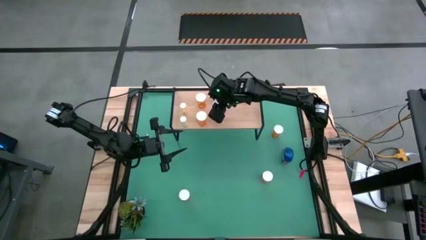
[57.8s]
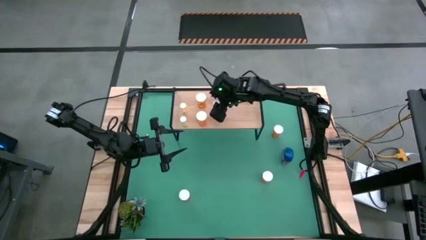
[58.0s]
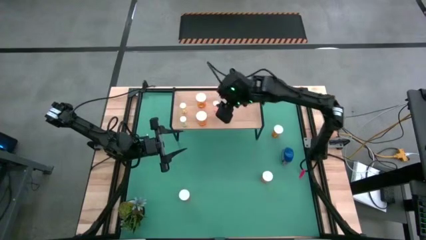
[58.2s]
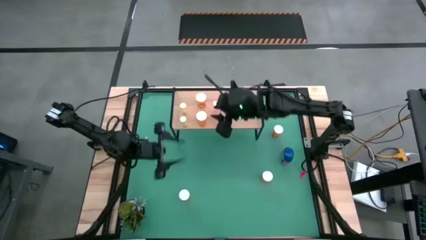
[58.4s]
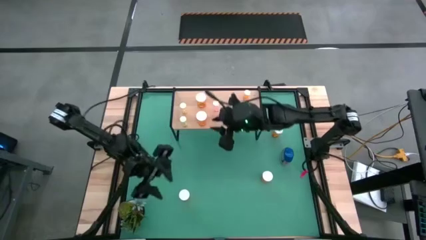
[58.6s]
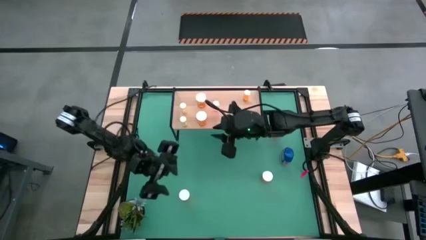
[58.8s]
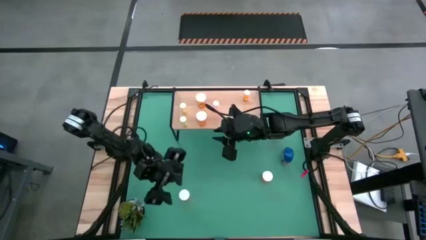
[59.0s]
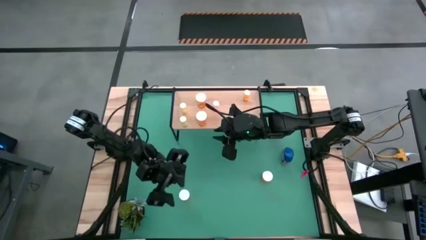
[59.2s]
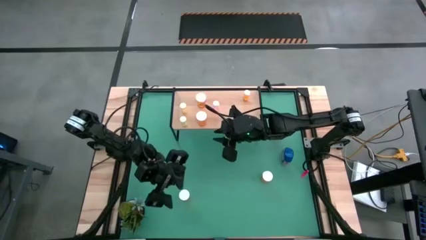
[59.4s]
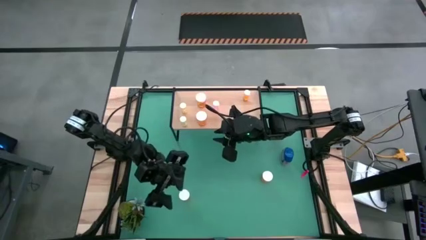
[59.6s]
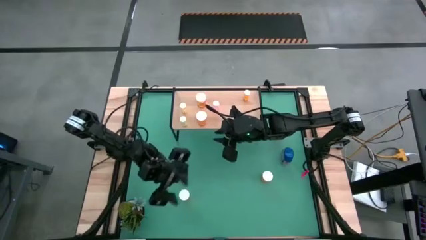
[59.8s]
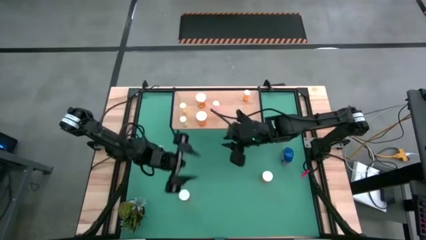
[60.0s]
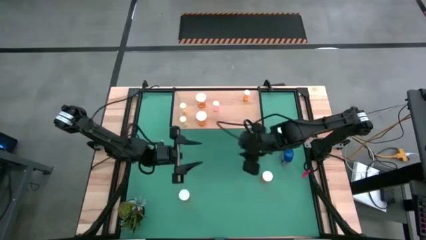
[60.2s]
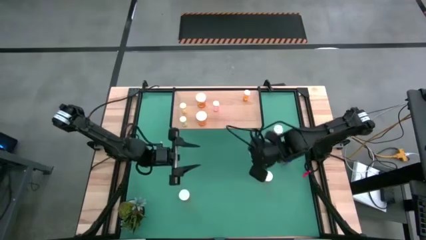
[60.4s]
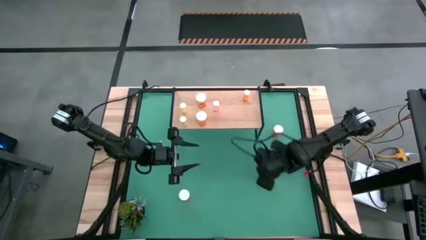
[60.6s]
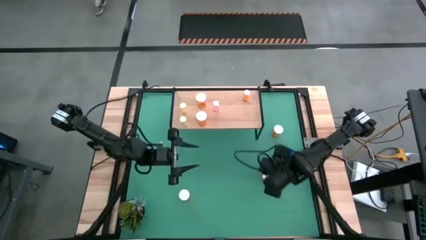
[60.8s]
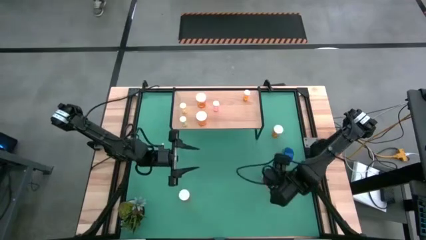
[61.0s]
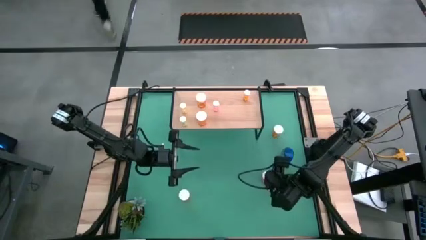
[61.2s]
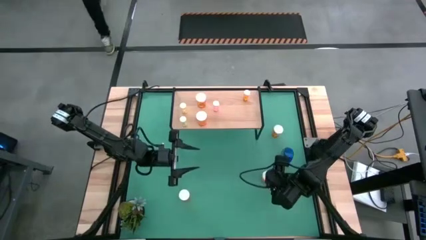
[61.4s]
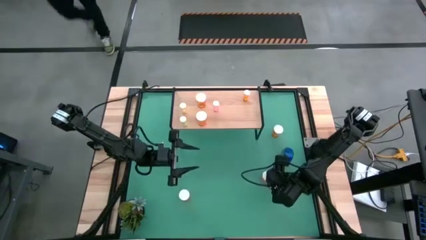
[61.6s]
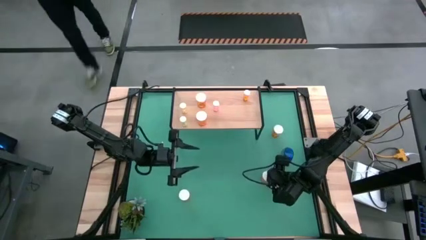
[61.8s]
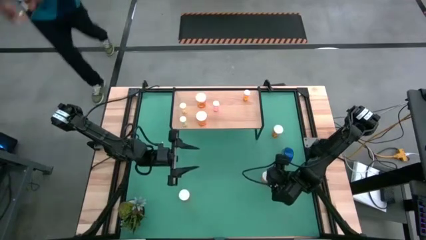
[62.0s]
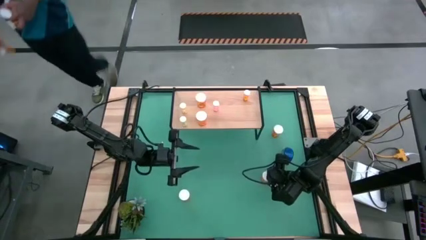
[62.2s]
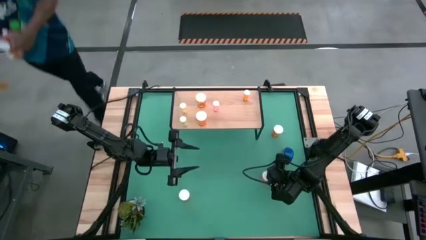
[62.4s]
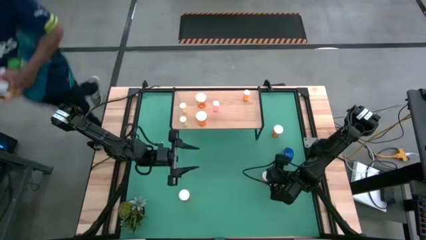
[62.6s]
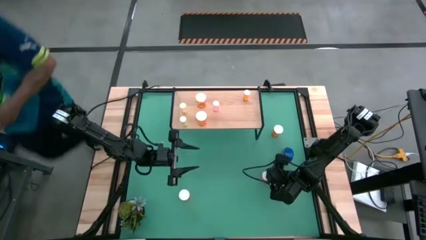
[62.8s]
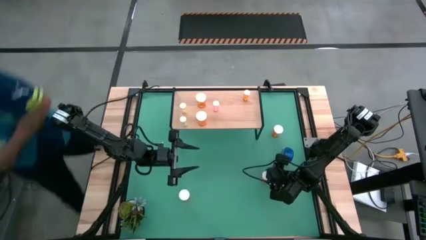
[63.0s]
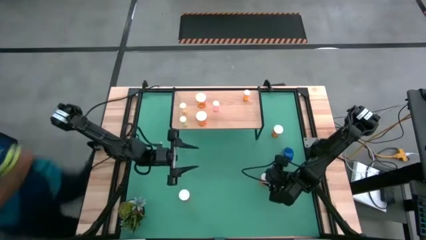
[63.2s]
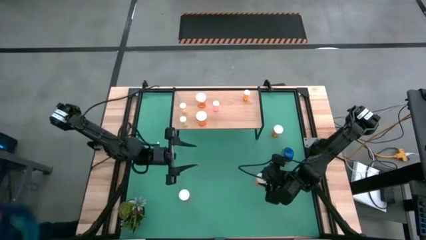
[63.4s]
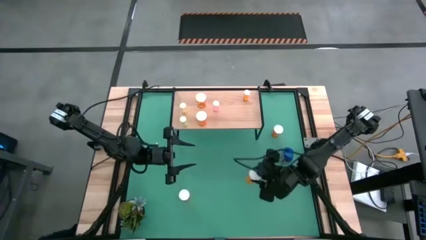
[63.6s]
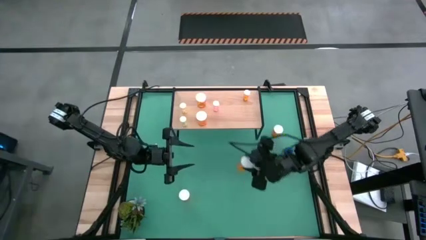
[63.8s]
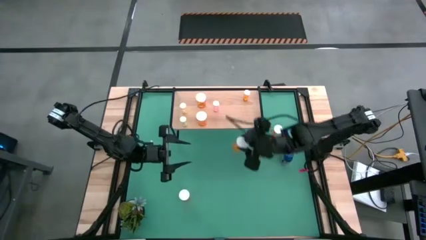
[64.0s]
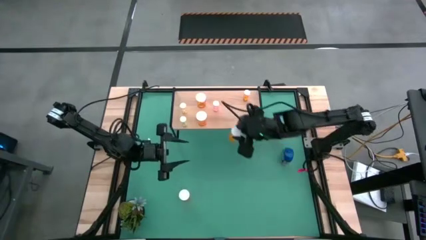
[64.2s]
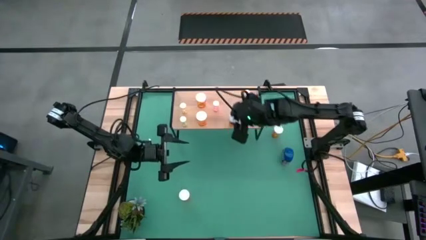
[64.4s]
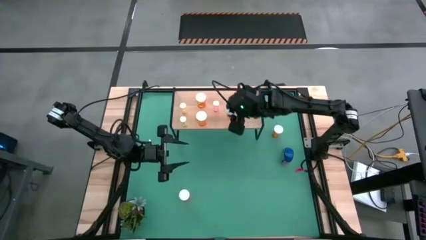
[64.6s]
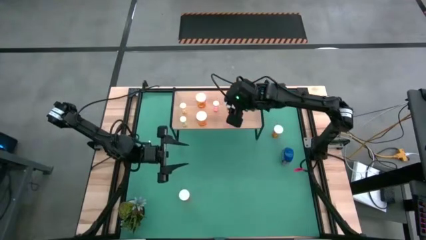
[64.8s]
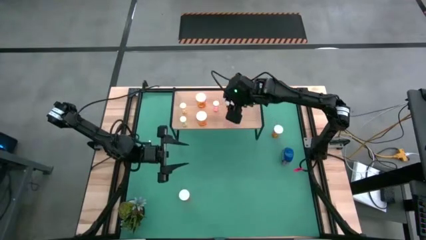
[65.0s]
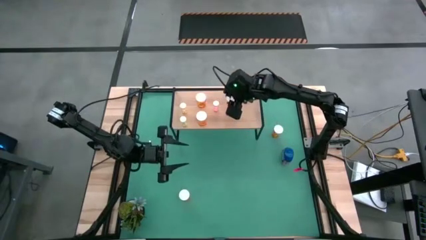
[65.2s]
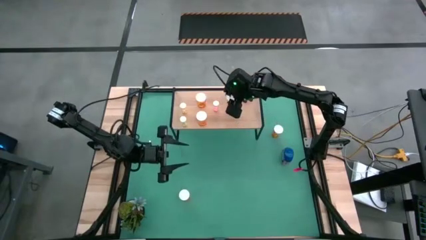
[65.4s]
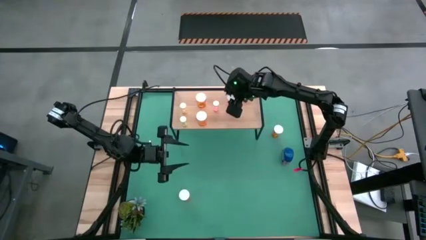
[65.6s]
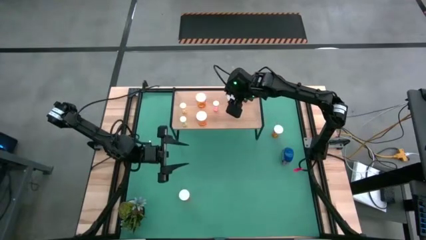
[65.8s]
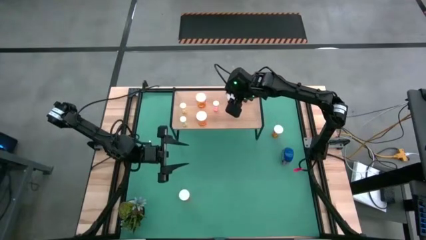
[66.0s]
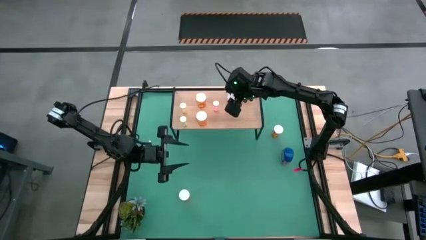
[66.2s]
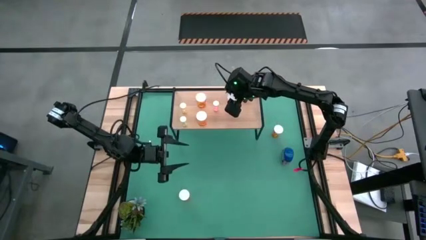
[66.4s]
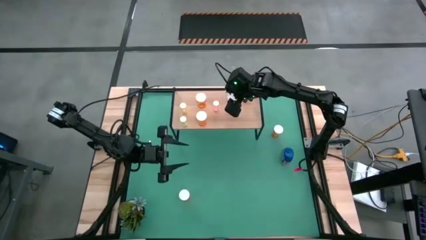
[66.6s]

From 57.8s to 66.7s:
Task: Pick and place medicine bottles onto shelf by color
Put the big orange pill bottle on the shelf

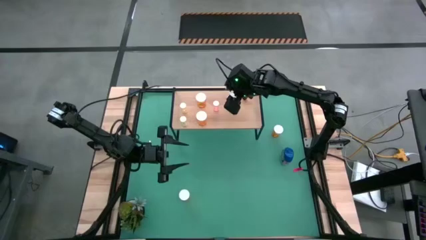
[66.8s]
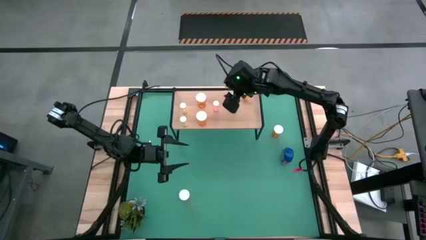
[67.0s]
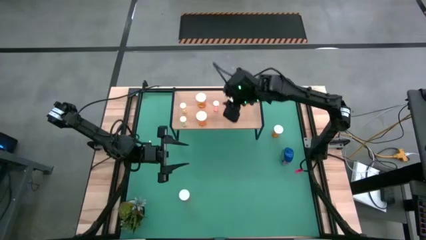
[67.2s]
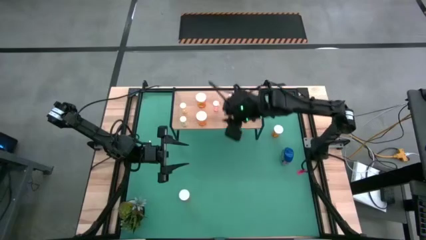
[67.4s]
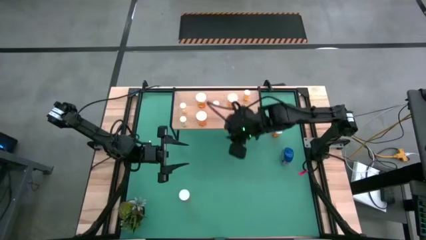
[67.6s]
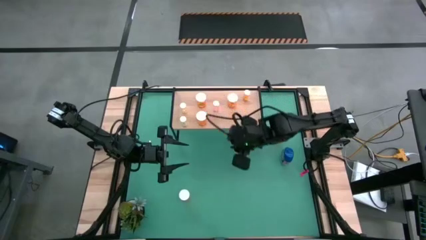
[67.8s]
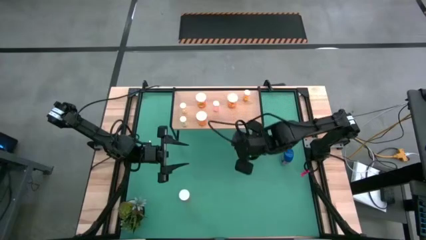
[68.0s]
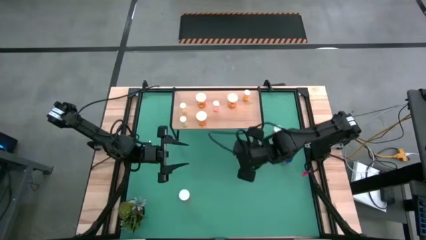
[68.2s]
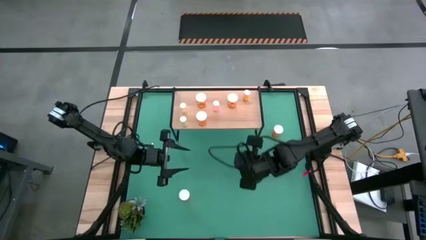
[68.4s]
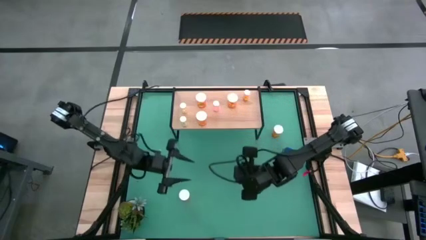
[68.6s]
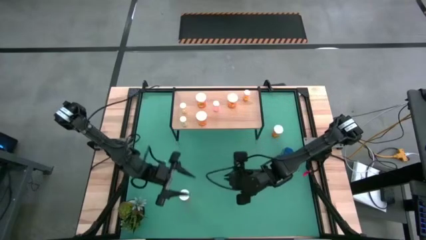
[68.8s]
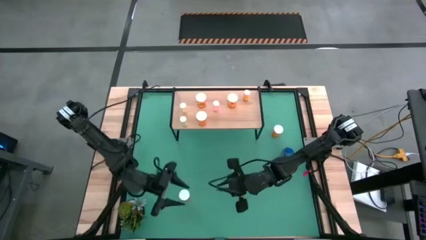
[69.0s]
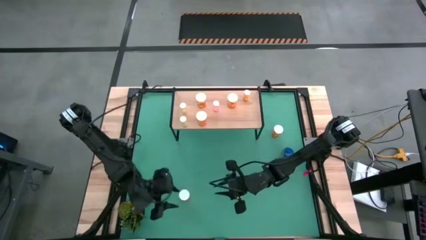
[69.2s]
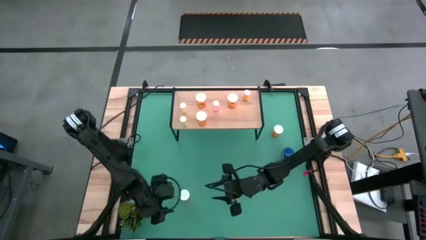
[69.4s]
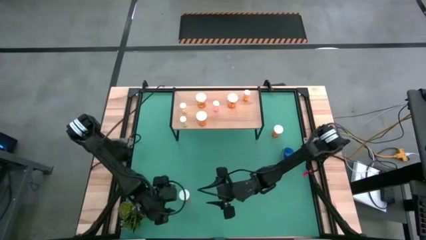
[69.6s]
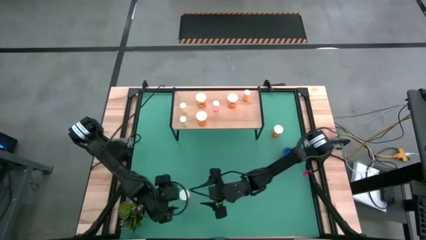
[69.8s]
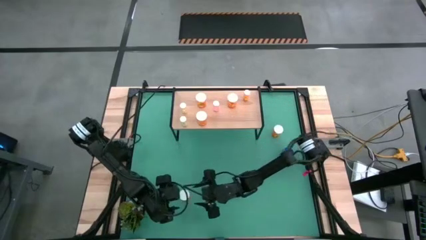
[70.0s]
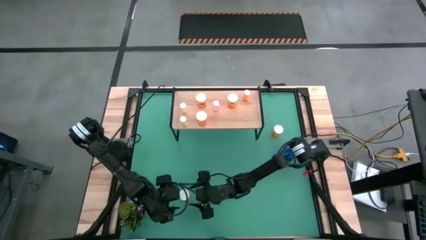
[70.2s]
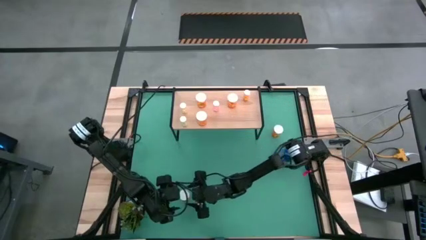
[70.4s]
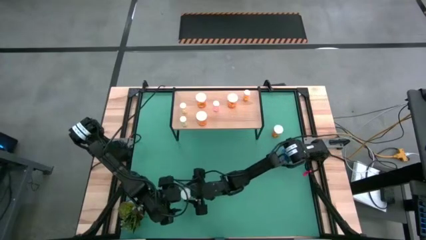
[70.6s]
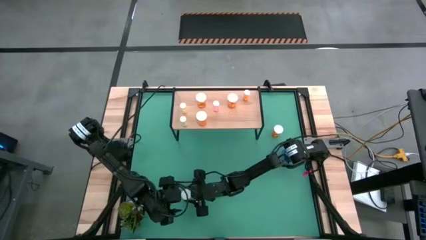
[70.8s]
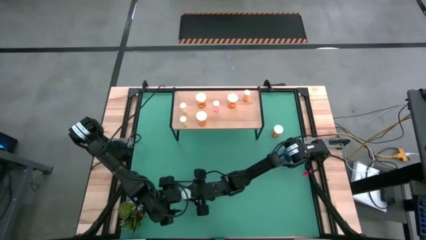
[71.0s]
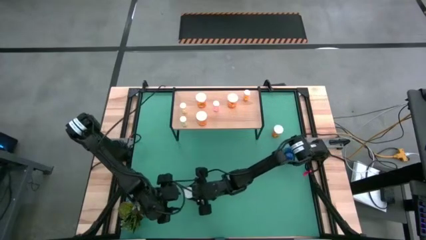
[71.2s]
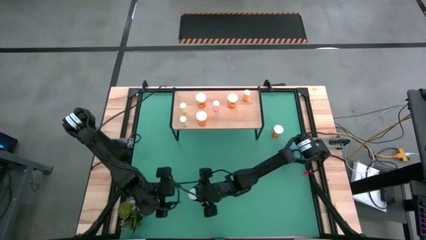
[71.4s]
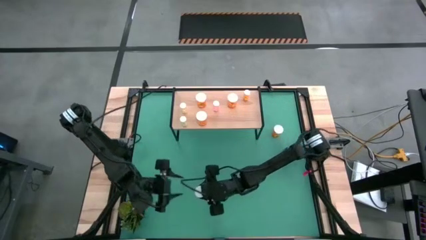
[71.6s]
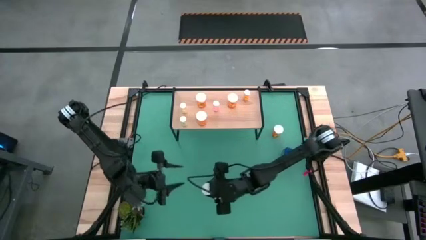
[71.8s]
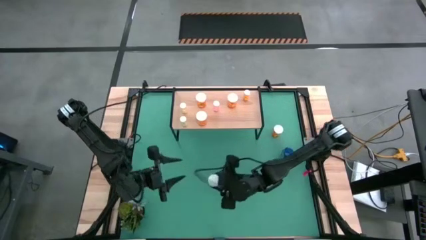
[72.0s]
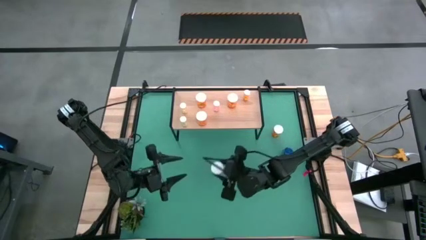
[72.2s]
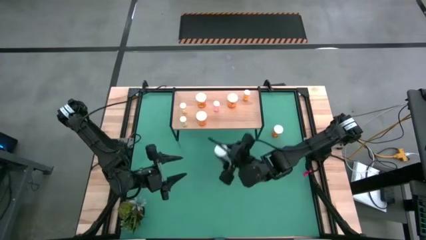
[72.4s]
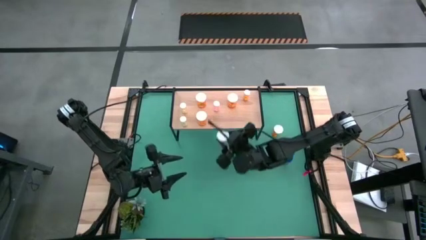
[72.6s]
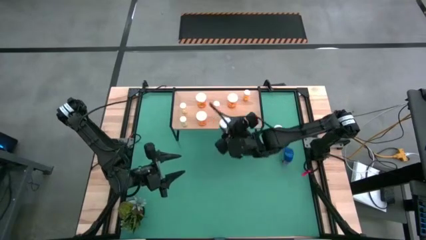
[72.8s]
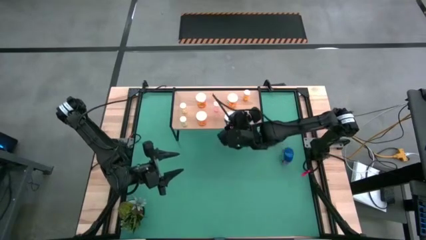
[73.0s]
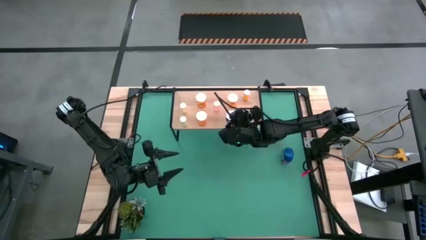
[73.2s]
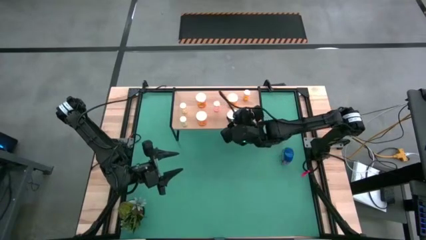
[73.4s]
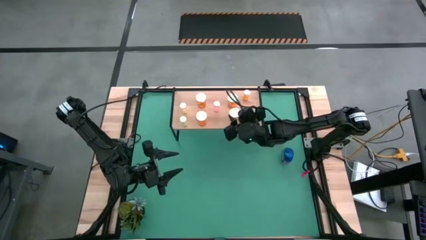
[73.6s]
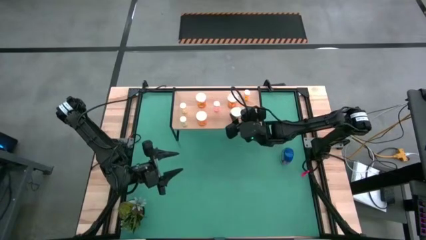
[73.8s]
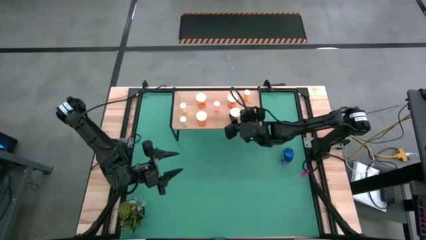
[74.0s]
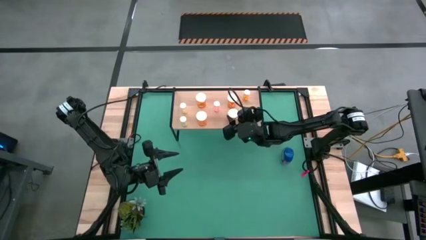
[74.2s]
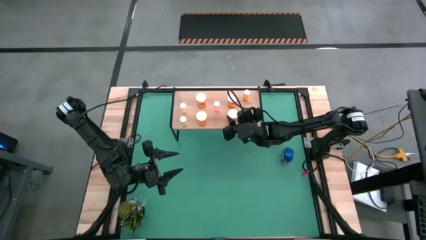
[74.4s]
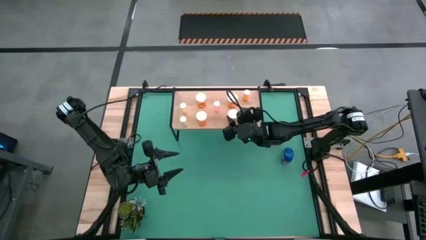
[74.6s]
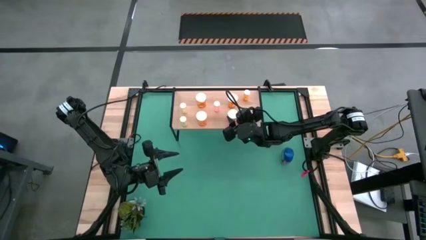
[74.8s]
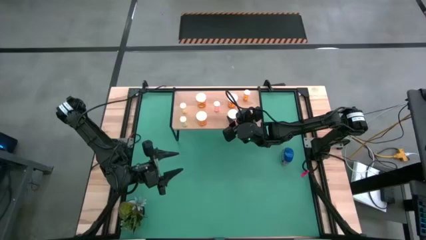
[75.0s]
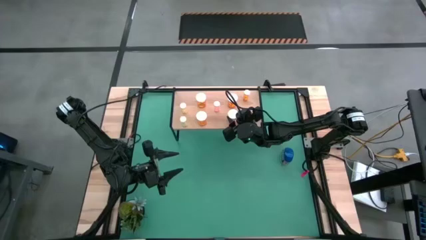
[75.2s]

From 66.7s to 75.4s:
Put the big orange pill bottle on the shelf
